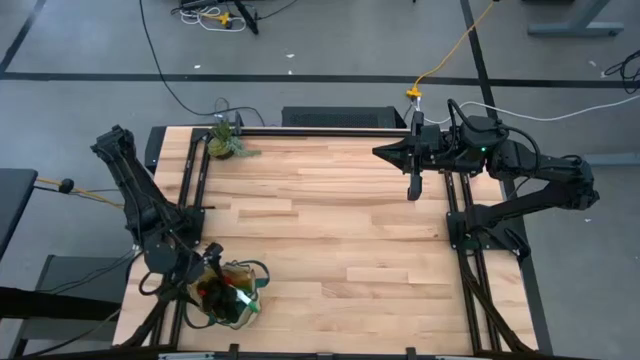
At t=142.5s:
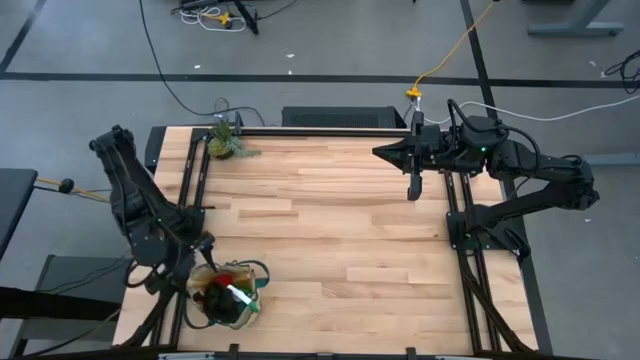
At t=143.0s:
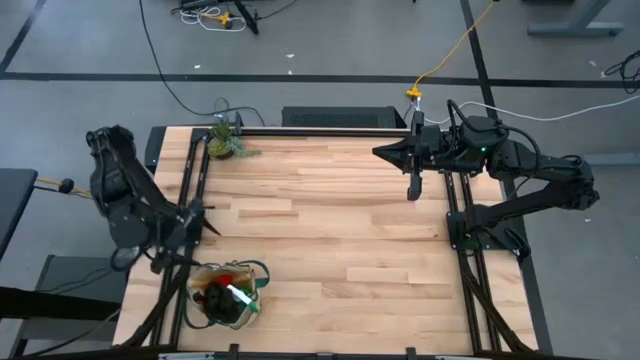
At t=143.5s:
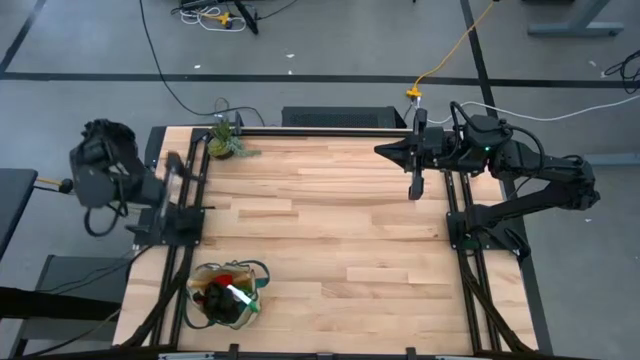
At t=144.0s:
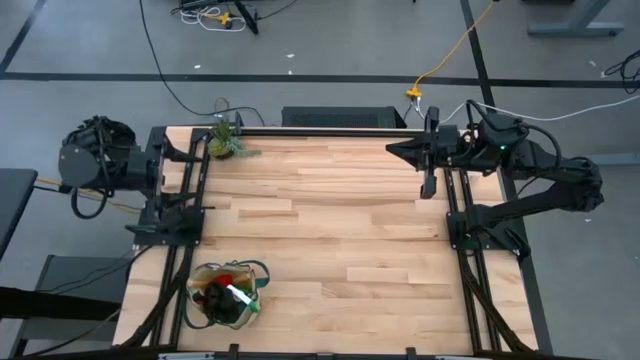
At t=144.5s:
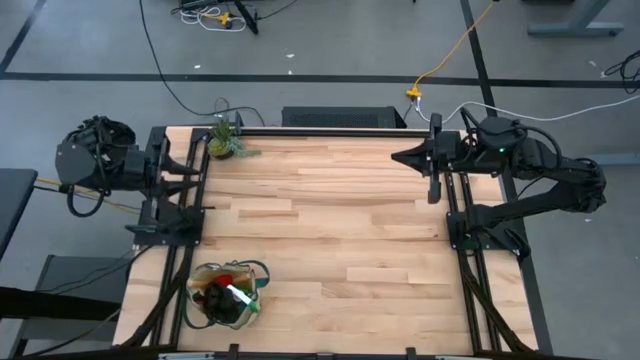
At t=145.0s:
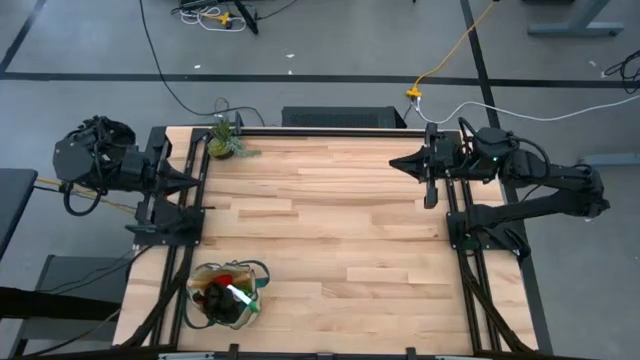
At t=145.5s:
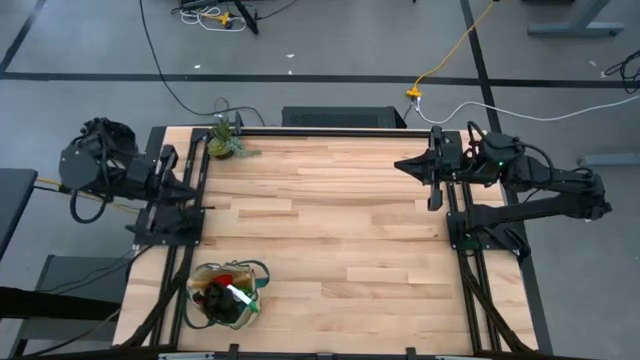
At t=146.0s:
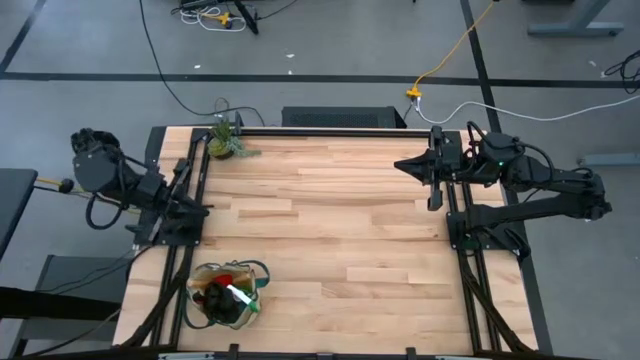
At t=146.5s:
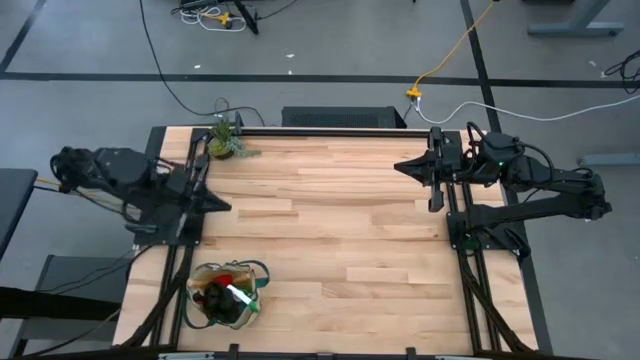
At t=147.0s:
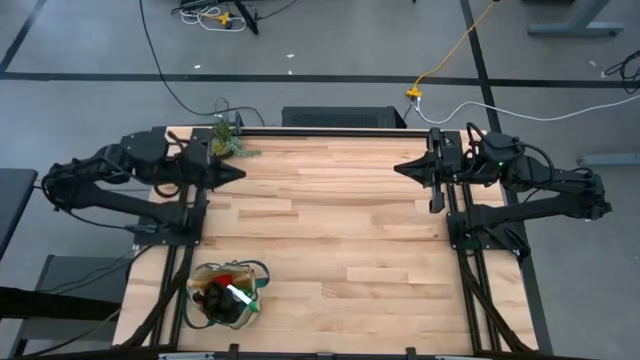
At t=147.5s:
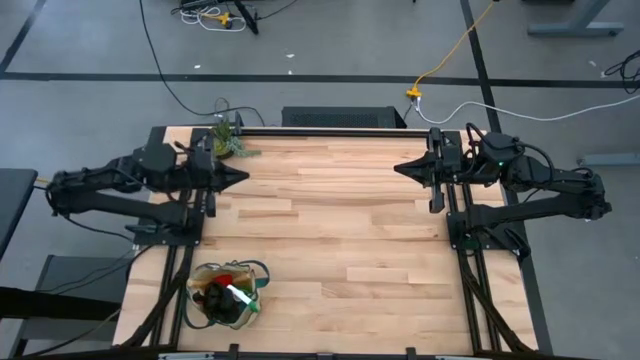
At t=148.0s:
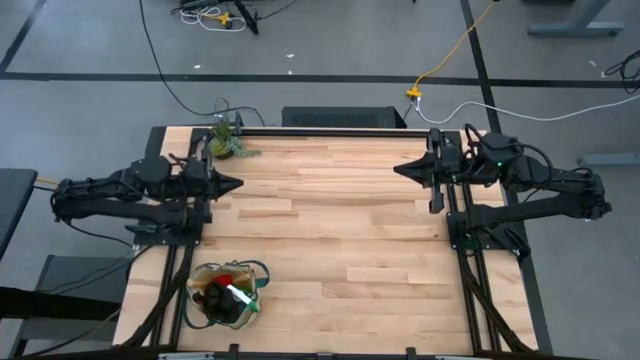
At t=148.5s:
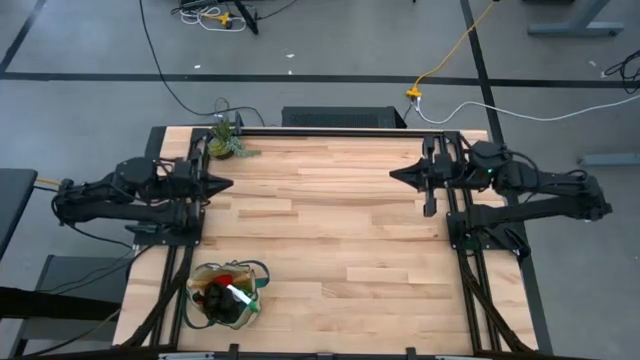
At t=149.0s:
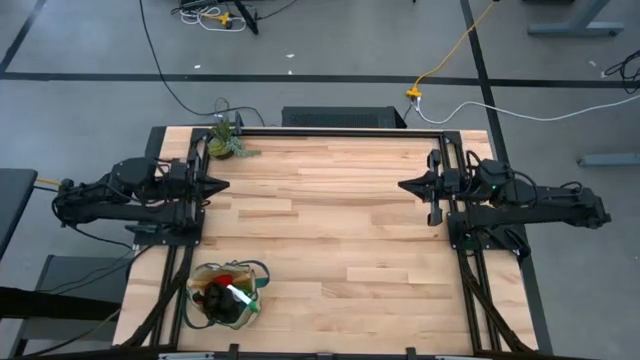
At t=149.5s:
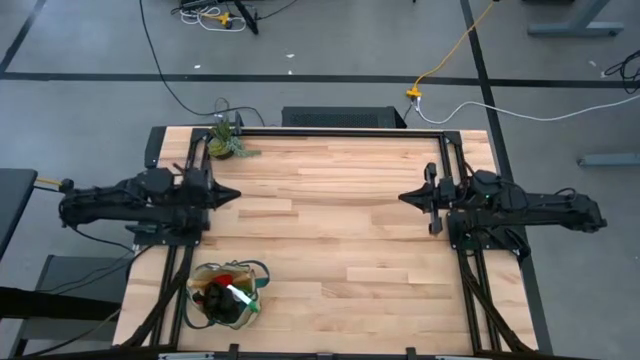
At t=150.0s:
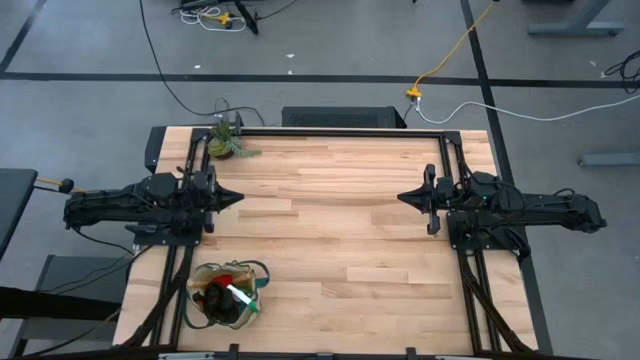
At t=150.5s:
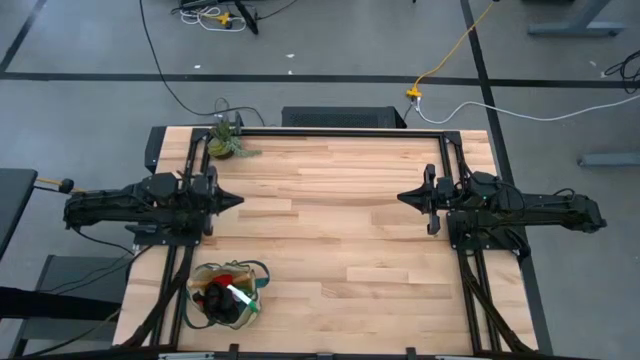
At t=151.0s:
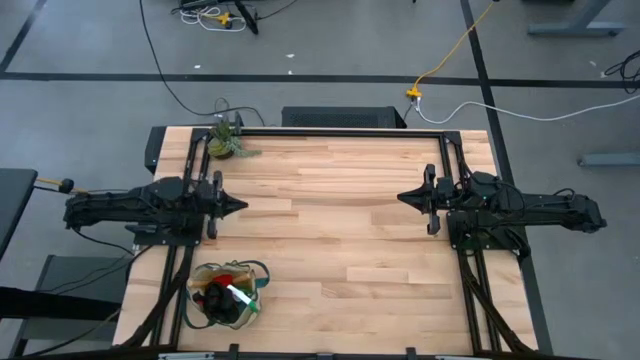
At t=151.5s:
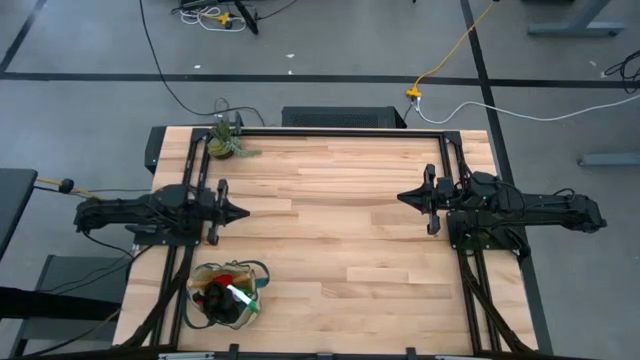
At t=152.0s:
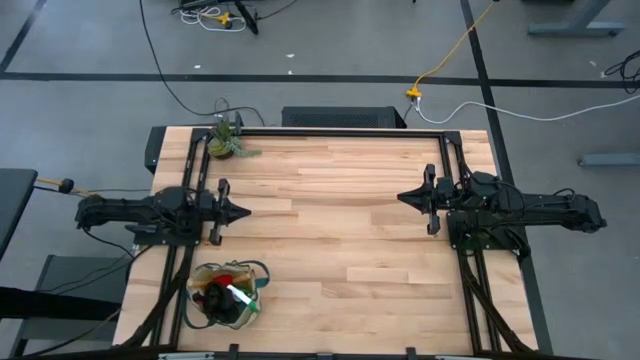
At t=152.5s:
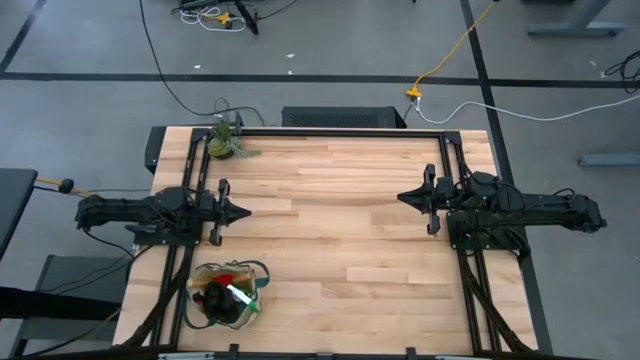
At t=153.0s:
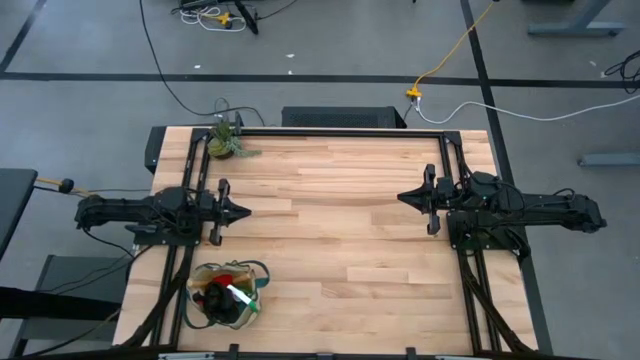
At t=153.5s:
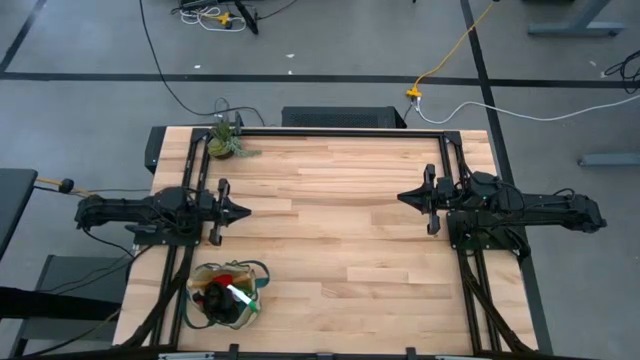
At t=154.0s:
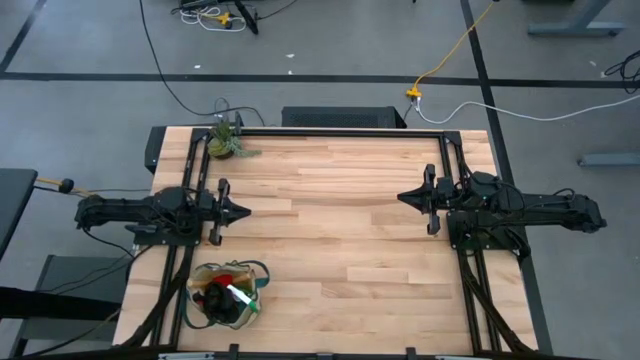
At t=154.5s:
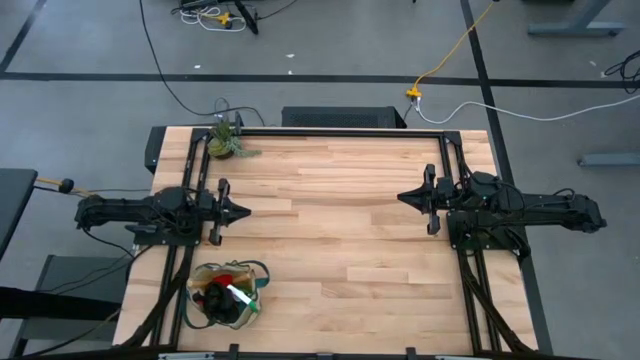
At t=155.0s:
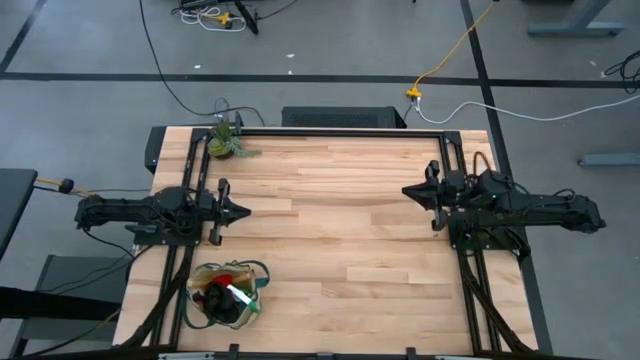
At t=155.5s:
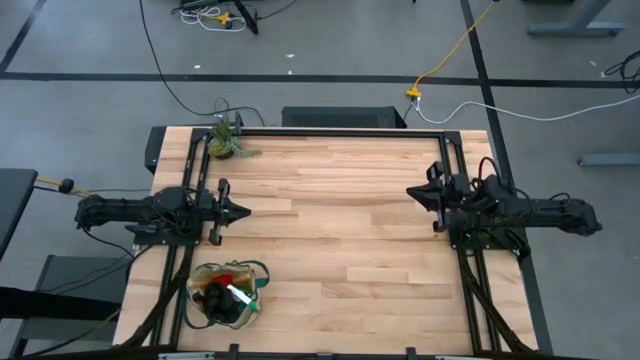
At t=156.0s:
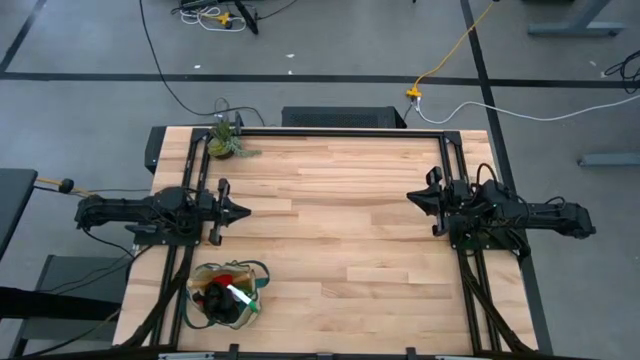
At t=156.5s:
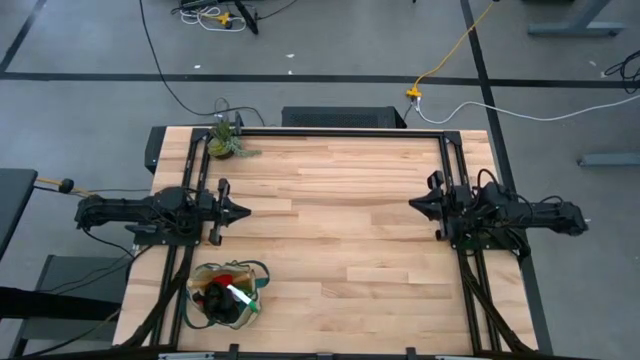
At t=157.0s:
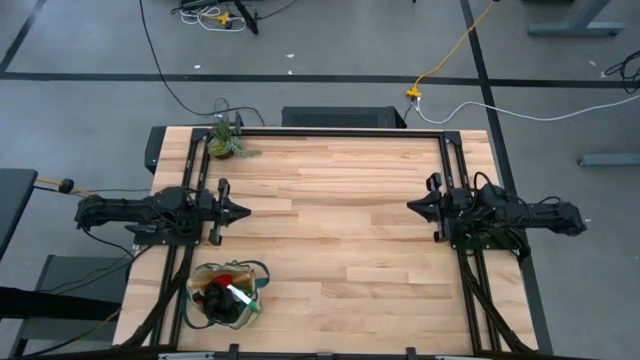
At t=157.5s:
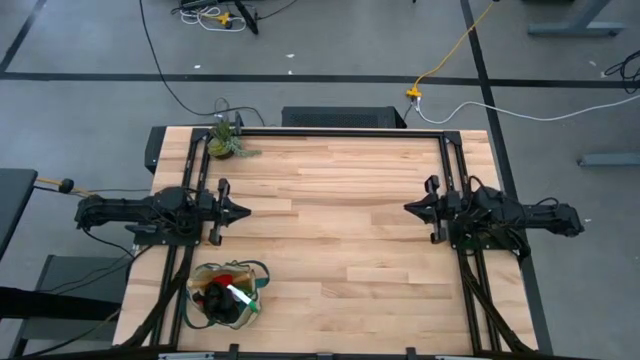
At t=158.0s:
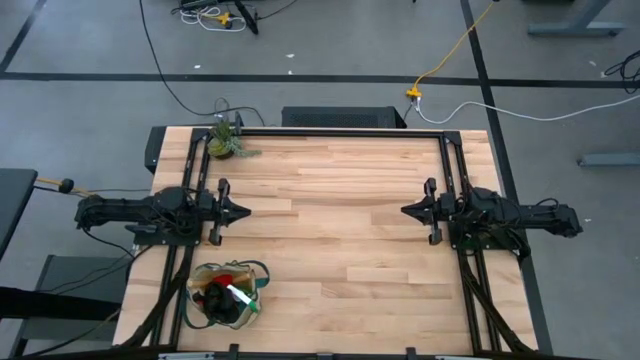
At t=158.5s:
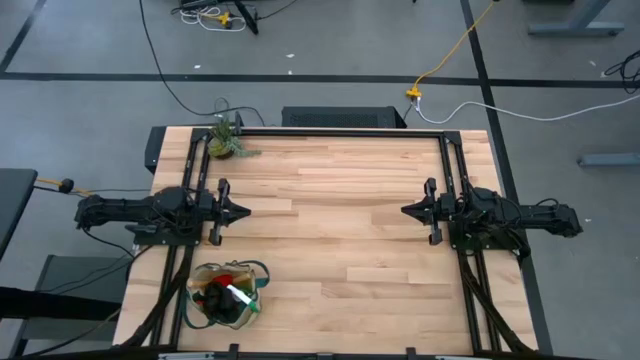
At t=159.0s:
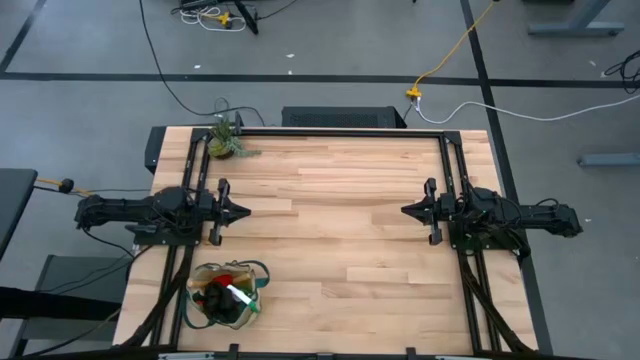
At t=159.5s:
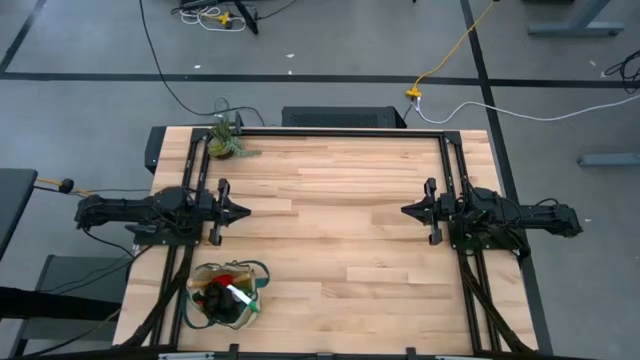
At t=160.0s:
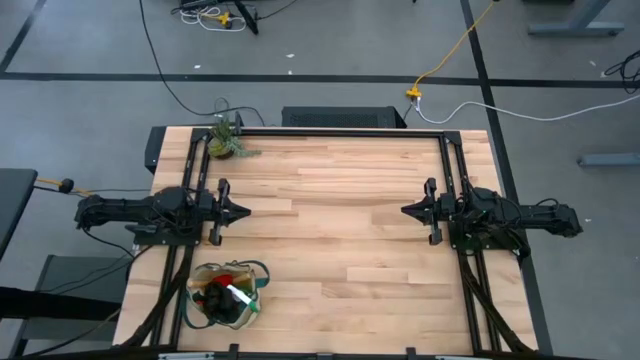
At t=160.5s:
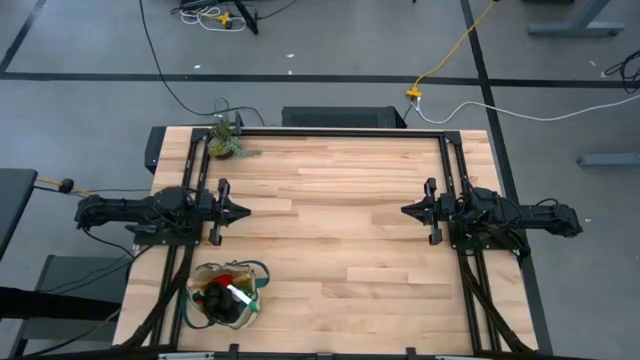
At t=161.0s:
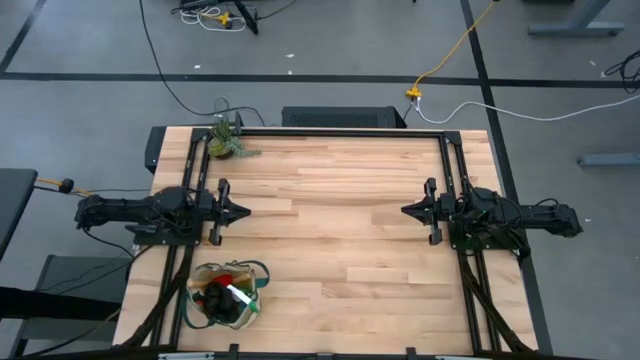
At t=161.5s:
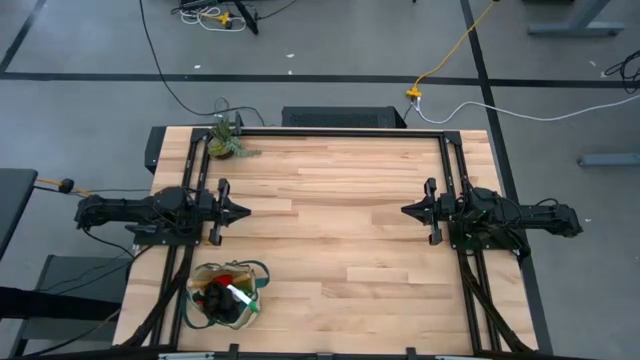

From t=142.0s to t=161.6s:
Task: Pick & Place Garden tools in Gardening bag
Return to Home Position

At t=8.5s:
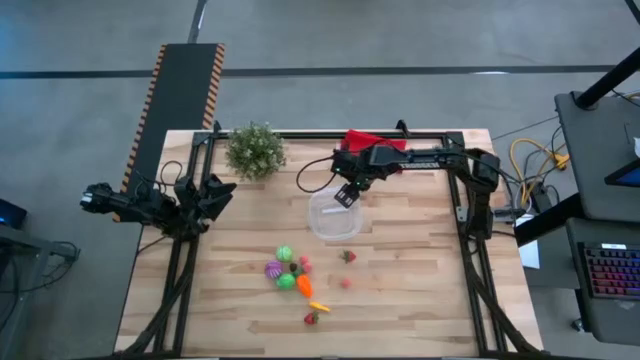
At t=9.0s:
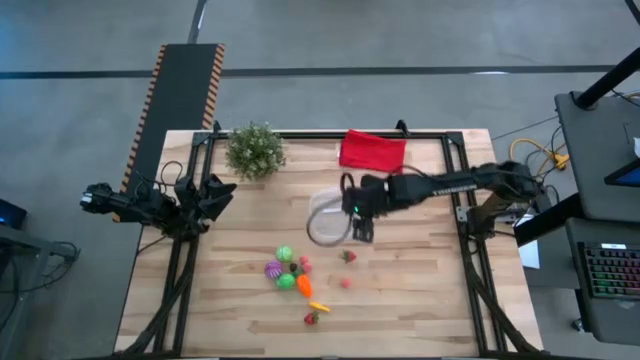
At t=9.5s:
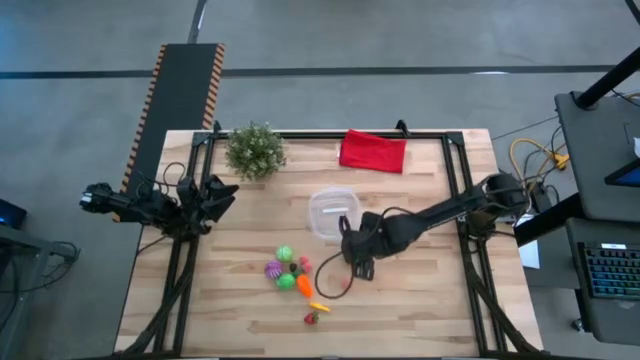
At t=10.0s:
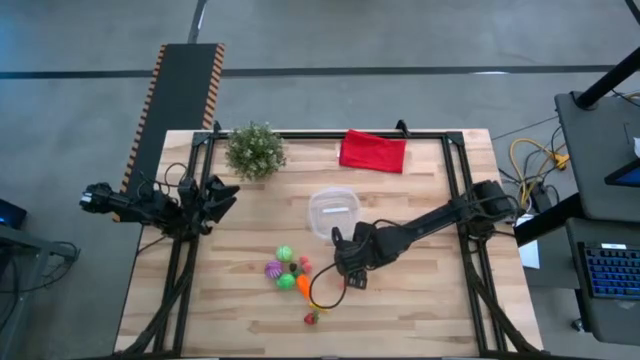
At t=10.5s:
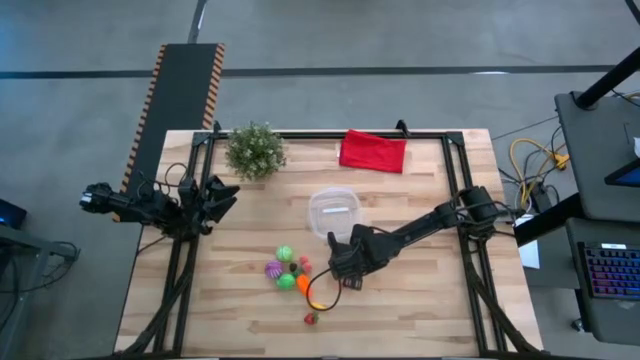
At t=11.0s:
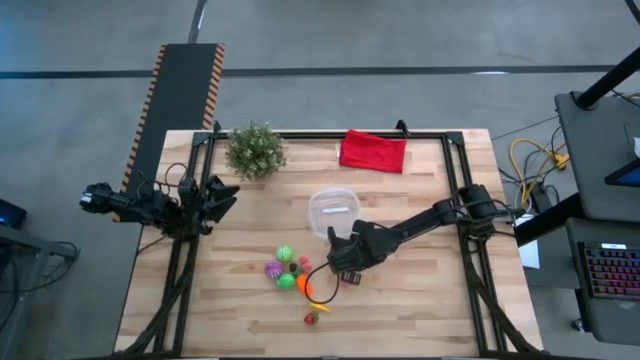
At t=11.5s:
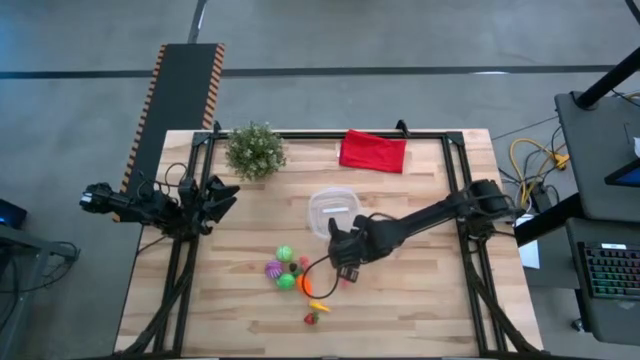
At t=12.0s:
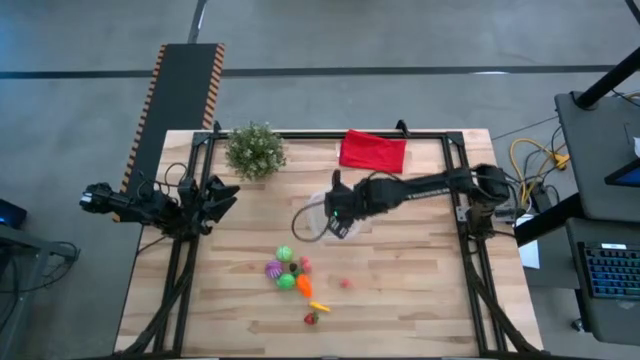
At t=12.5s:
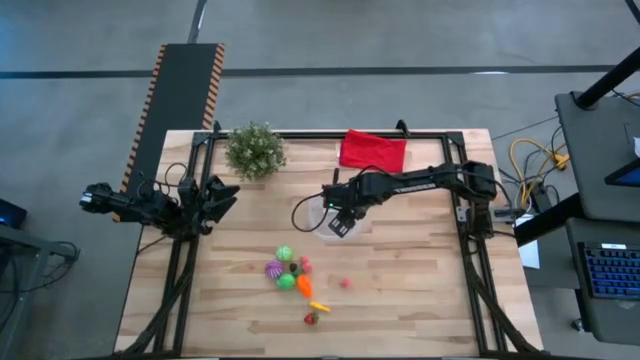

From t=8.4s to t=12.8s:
Task: Pick and placing Produce into tupperware
Put the top red strawberry into the transparent container
